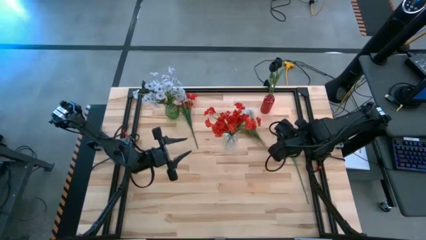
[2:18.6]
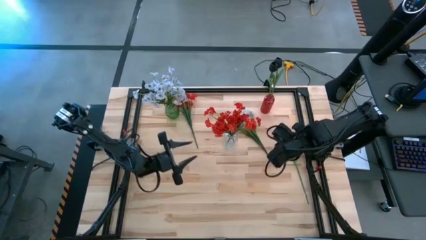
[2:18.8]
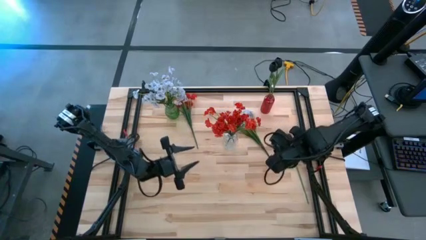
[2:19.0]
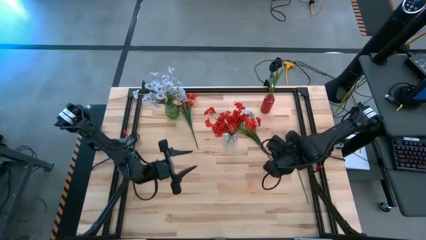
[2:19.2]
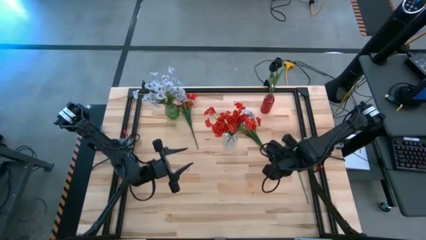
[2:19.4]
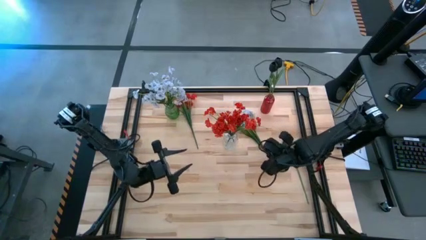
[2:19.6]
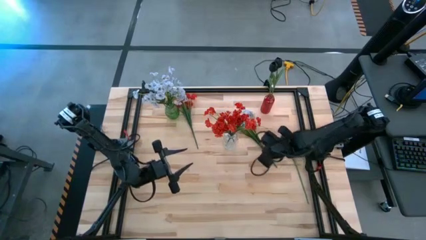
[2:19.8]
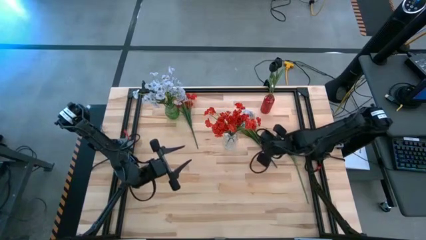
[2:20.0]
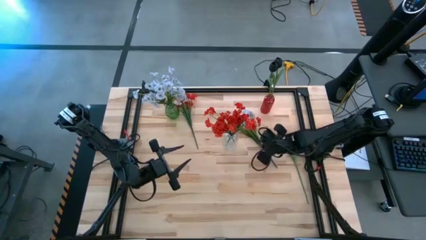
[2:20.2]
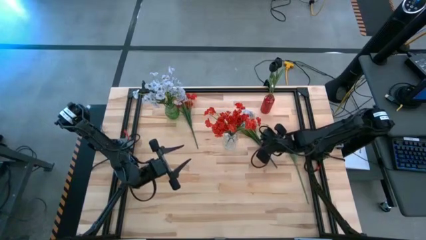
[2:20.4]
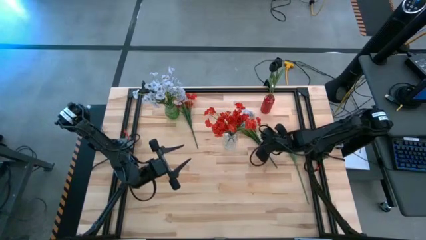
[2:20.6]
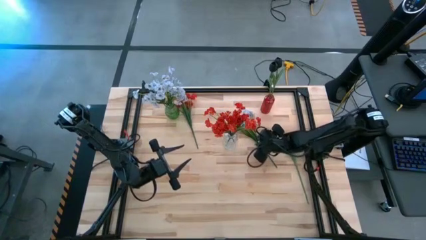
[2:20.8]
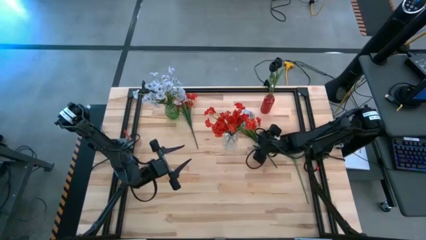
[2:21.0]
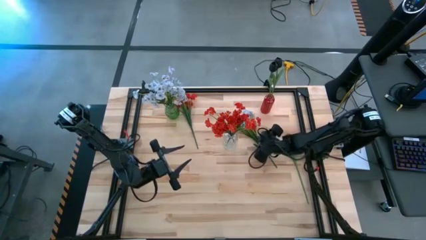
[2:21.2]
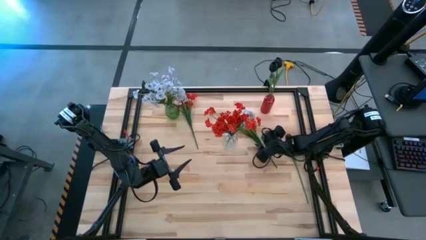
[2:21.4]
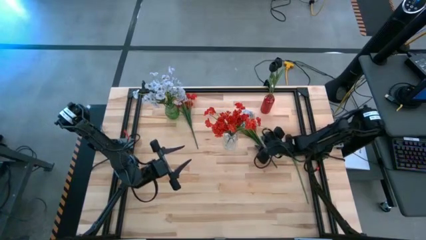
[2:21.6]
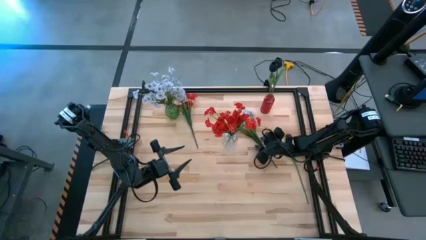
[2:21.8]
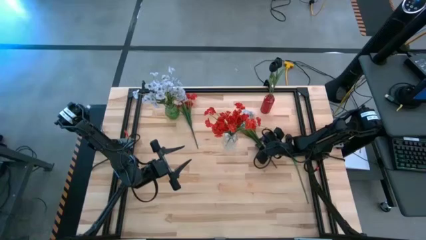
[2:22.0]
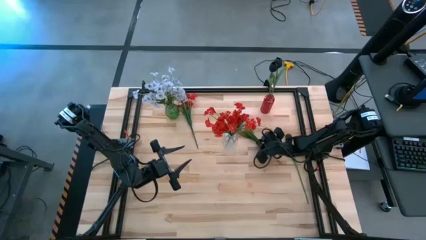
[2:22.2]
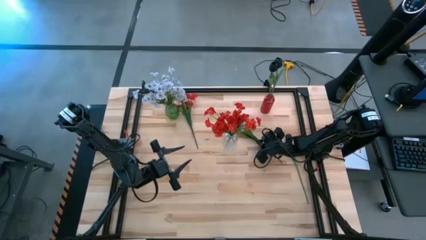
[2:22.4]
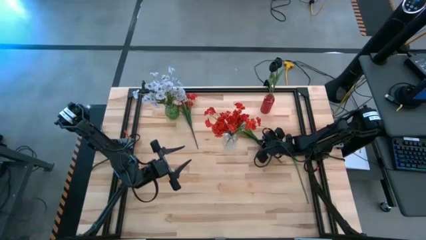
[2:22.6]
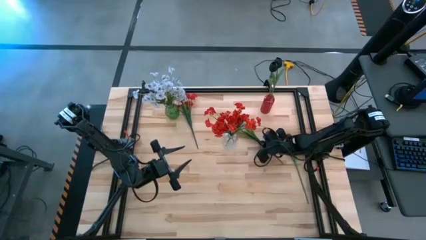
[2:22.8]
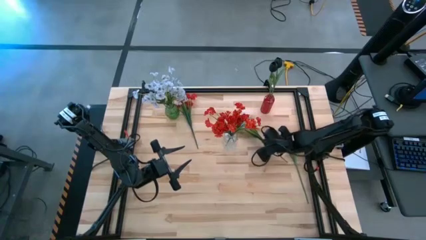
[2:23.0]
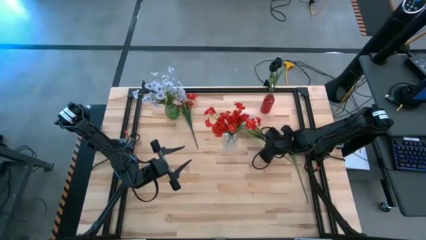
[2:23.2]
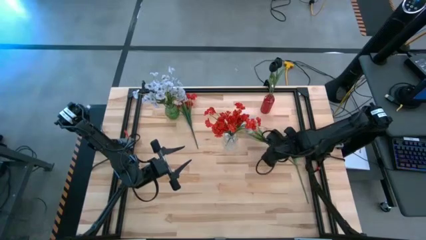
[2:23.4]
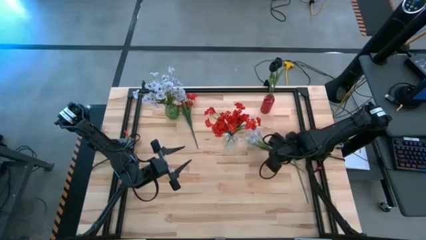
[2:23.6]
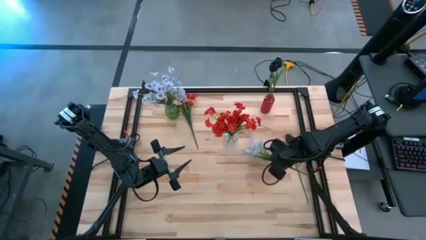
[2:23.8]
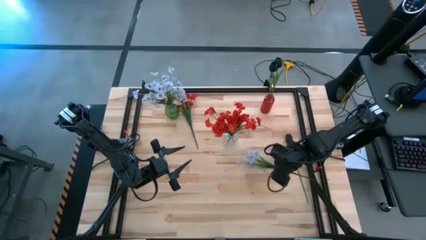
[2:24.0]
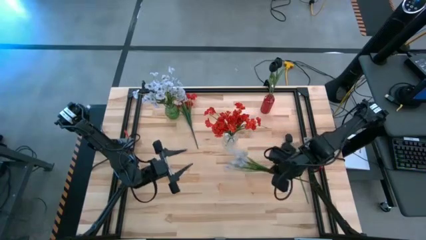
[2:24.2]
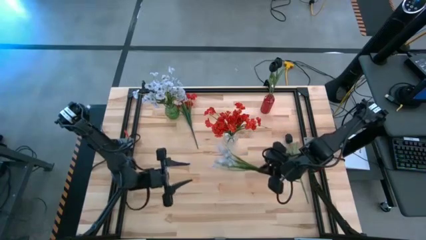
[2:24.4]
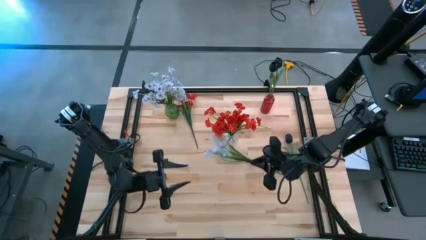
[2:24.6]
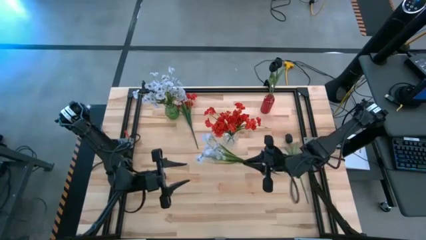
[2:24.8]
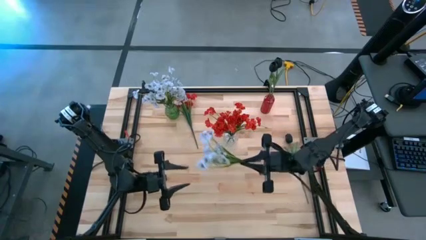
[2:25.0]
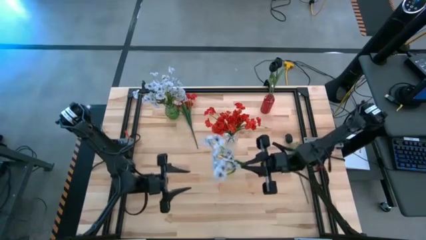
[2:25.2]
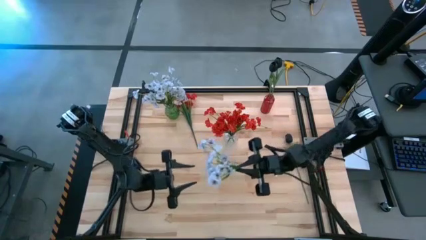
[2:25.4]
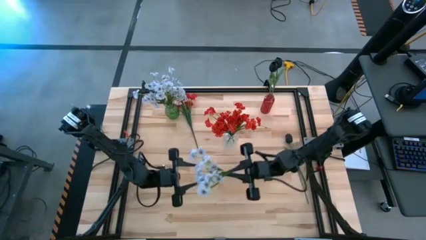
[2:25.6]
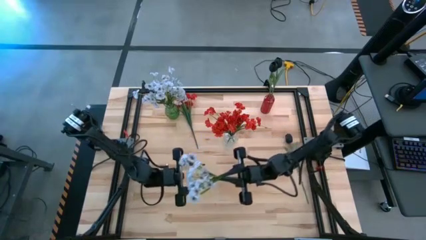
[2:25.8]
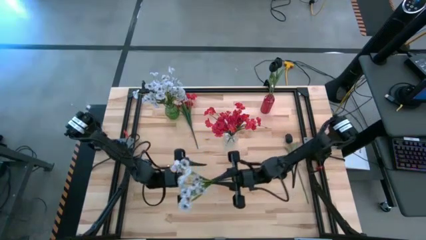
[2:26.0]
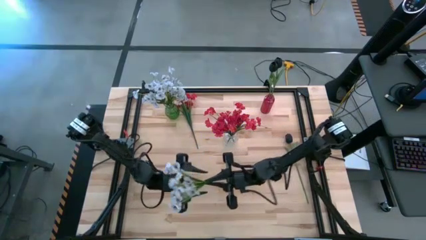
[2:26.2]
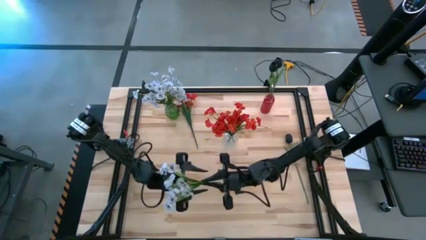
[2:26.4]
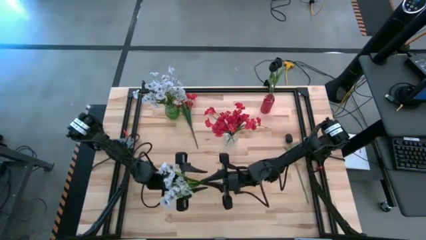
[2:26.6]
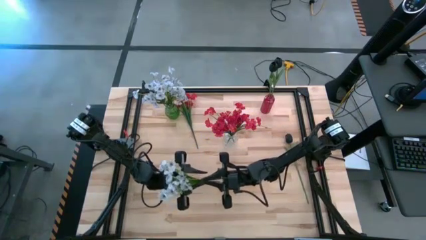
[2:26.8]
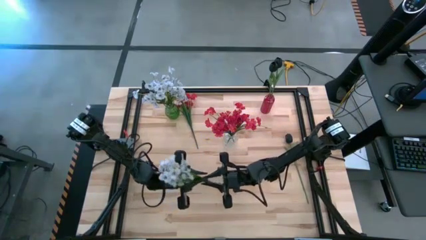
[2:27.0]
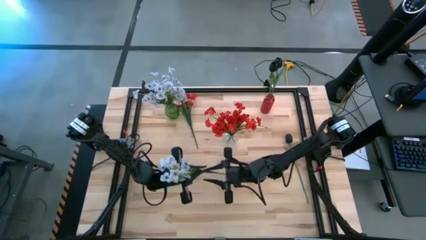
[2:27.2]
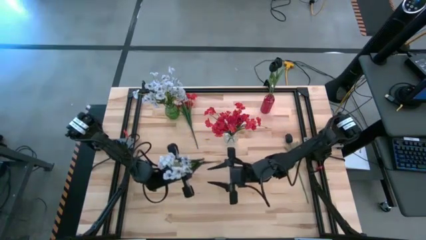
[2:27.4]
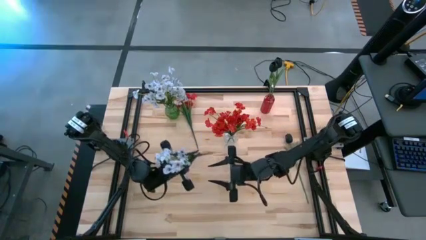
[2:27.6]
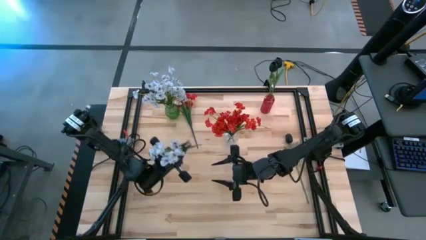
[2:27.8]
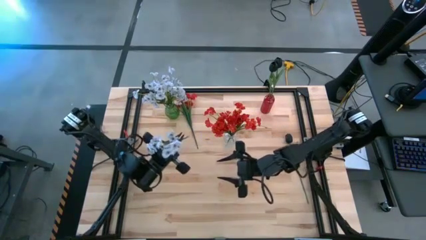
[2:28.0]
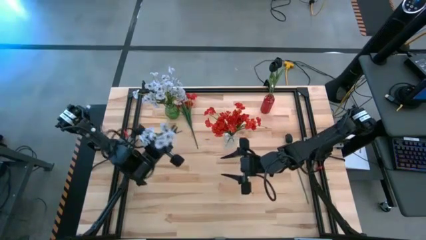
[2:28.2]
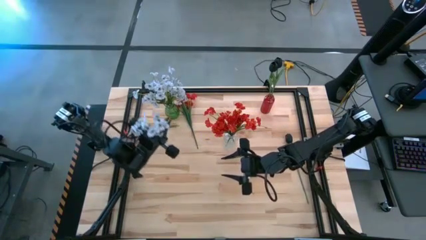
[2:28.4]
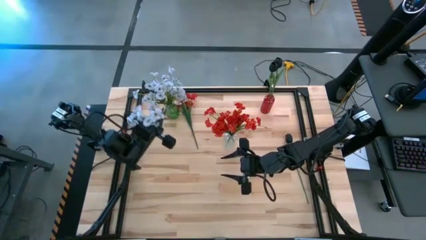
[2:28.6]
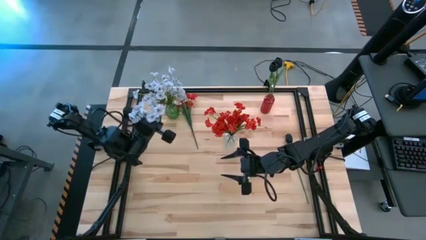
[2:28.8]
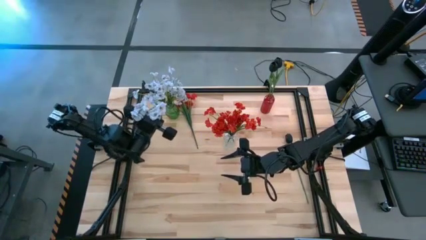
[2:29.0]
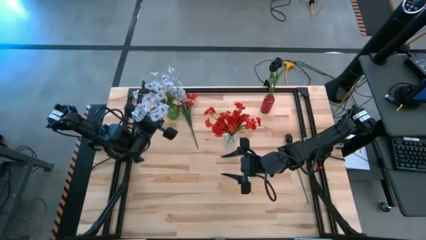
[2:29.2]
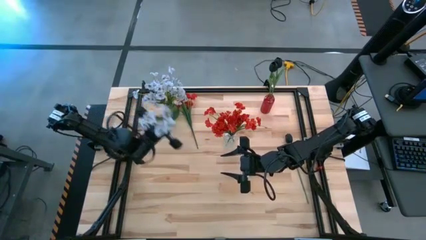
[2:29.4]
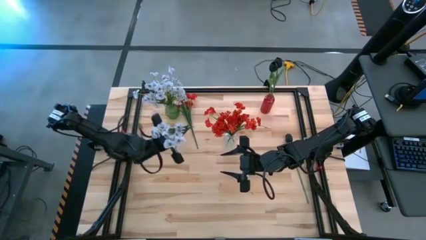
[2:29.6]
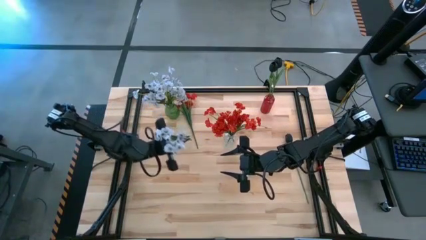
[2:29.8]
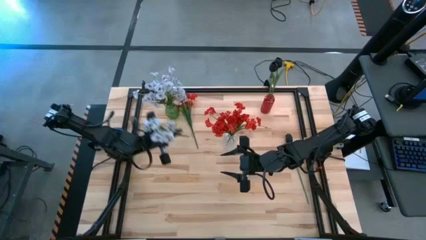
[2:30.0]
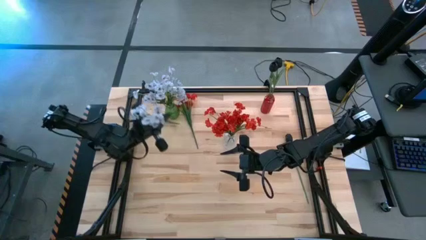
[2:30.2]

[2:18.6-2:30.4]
Task: Sort flowers into vase by color
Put the white flower into the green vase
